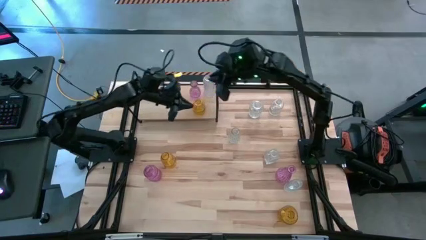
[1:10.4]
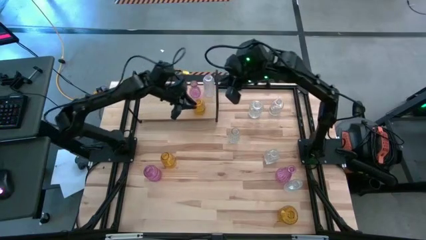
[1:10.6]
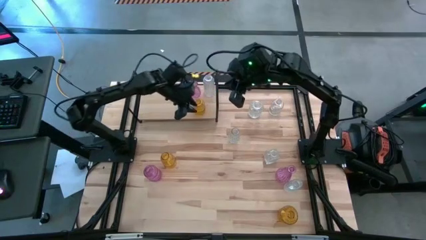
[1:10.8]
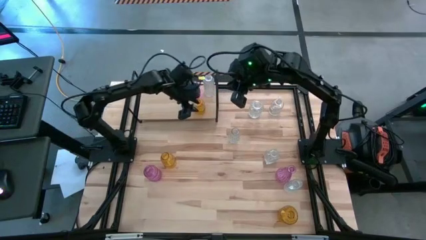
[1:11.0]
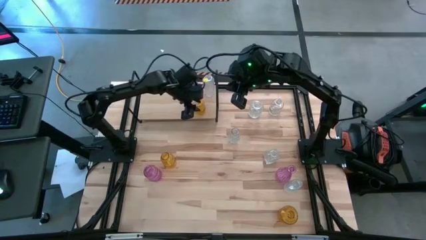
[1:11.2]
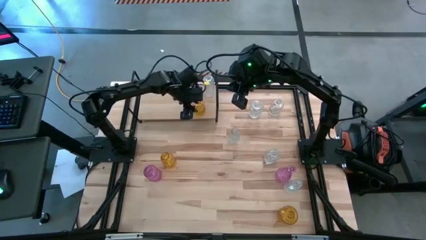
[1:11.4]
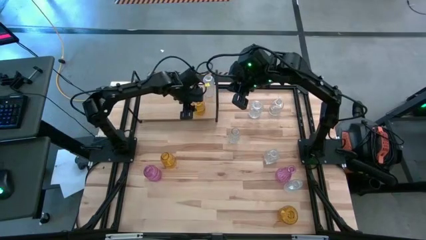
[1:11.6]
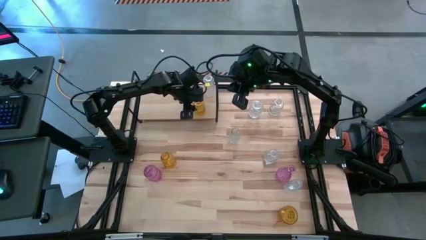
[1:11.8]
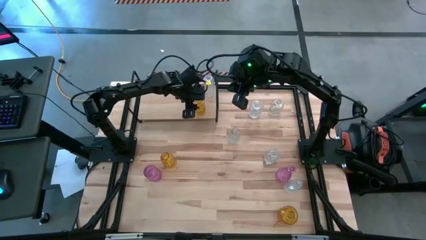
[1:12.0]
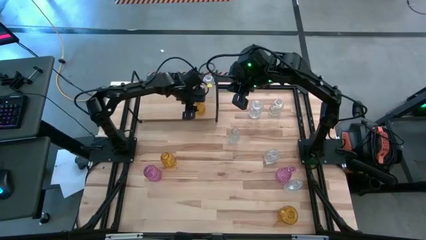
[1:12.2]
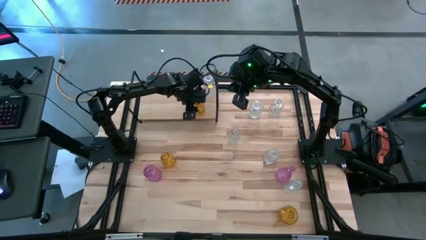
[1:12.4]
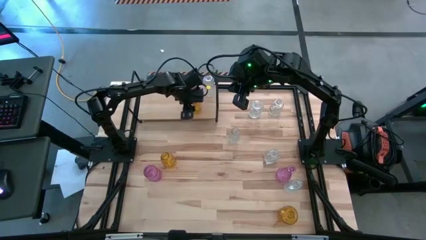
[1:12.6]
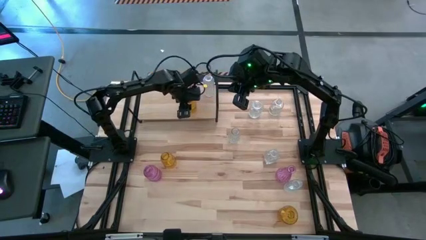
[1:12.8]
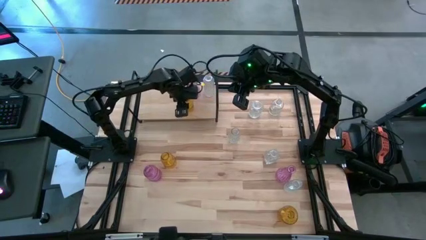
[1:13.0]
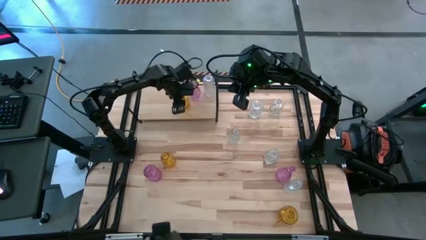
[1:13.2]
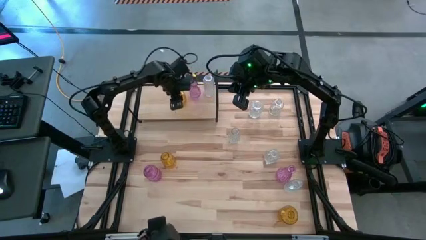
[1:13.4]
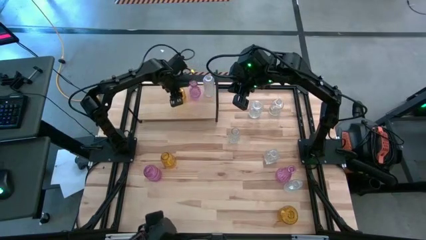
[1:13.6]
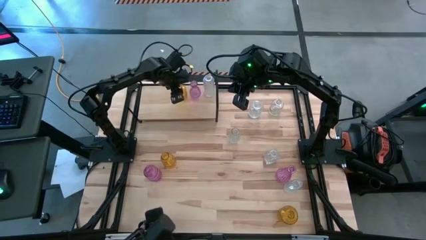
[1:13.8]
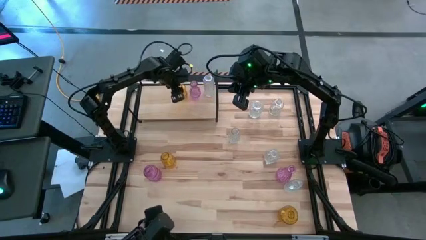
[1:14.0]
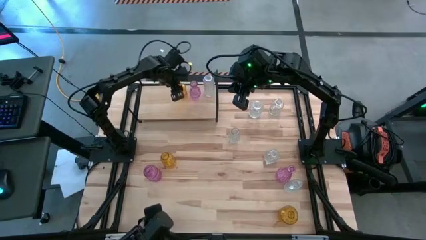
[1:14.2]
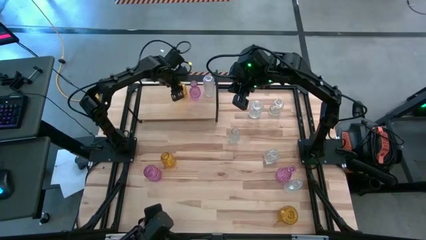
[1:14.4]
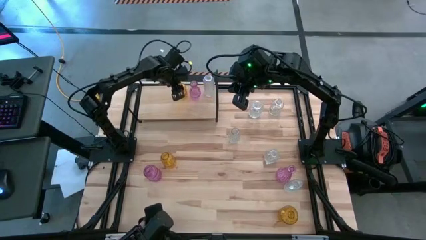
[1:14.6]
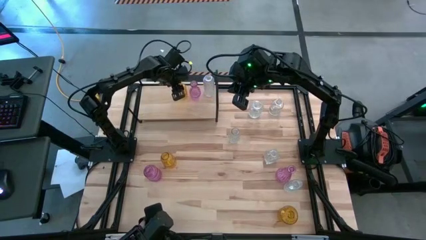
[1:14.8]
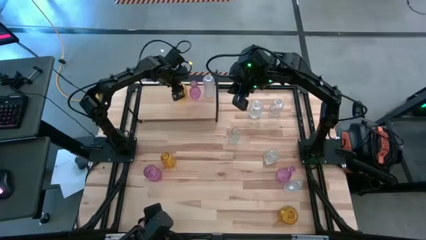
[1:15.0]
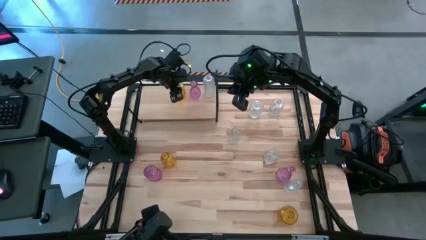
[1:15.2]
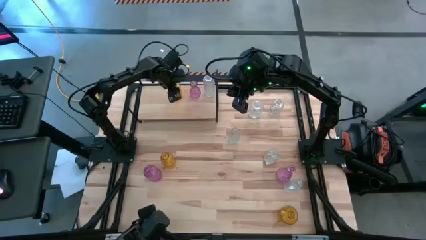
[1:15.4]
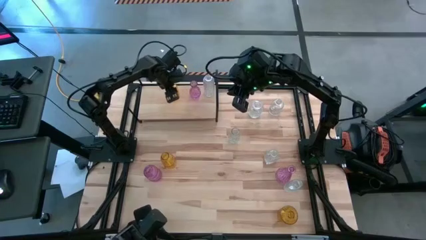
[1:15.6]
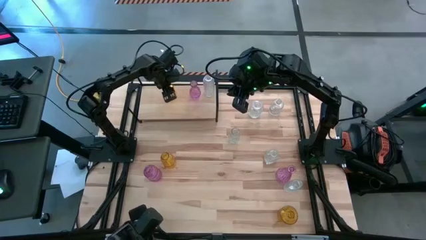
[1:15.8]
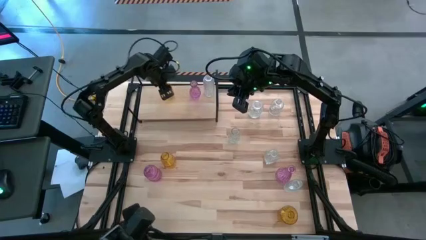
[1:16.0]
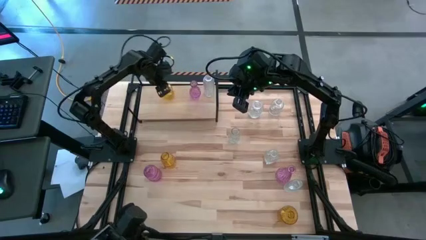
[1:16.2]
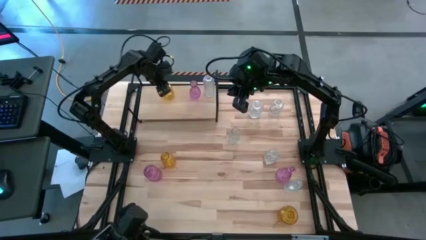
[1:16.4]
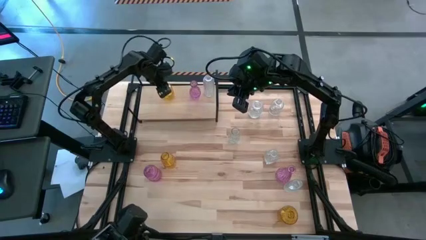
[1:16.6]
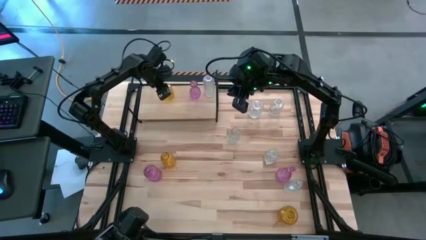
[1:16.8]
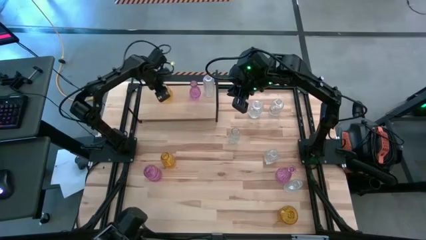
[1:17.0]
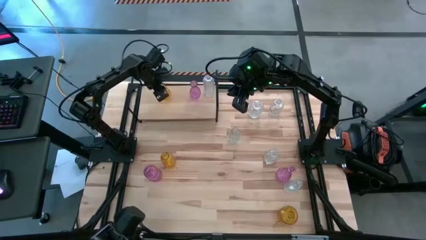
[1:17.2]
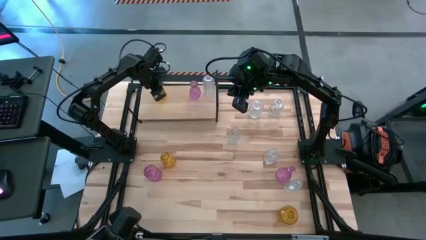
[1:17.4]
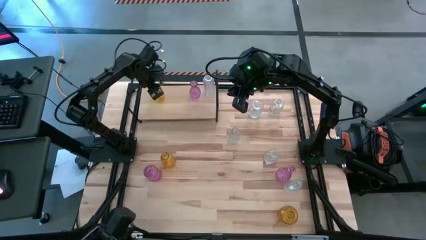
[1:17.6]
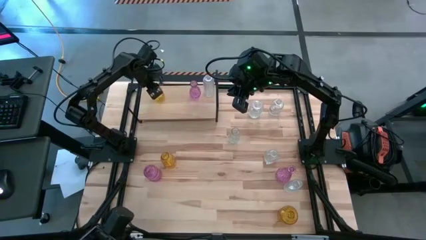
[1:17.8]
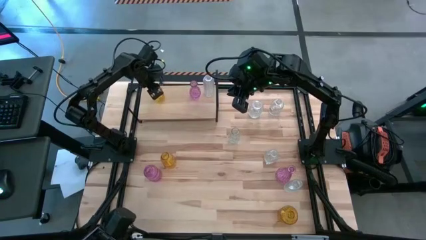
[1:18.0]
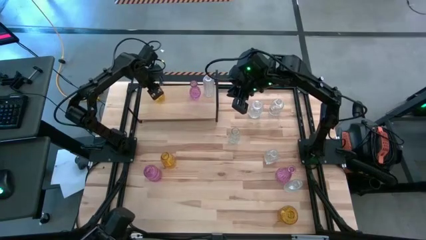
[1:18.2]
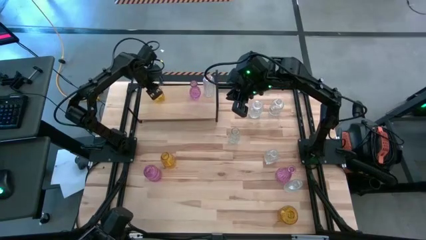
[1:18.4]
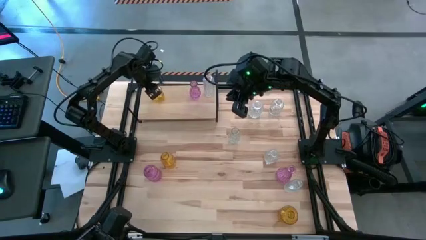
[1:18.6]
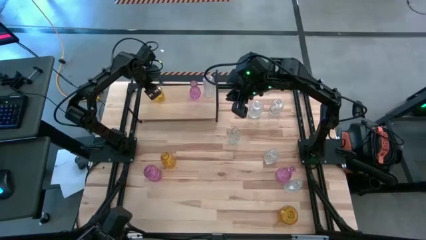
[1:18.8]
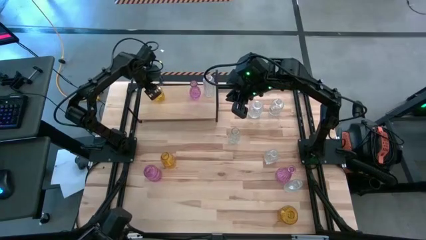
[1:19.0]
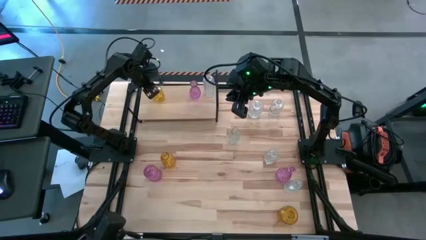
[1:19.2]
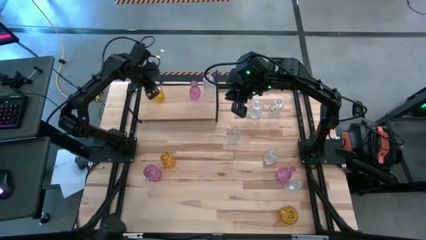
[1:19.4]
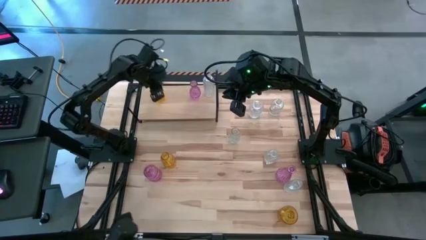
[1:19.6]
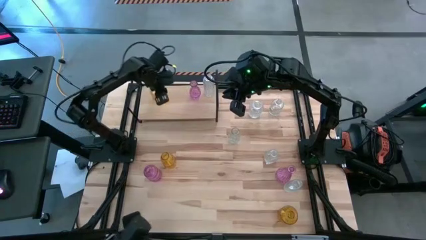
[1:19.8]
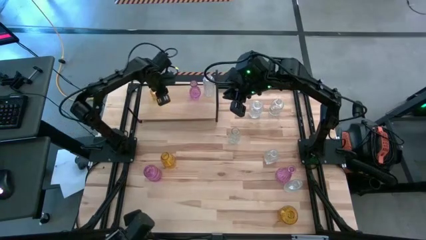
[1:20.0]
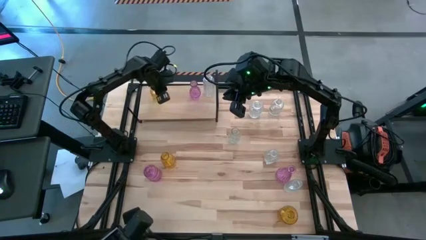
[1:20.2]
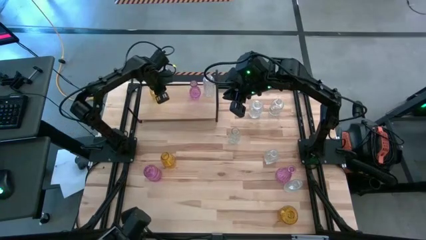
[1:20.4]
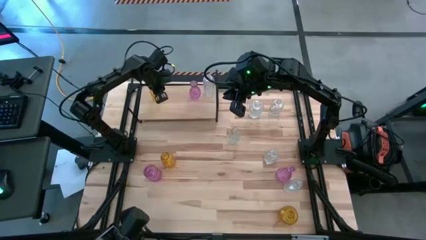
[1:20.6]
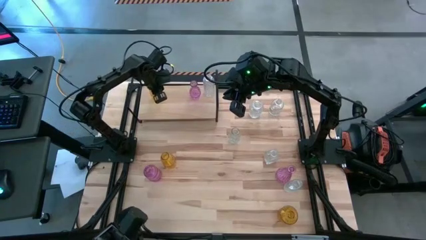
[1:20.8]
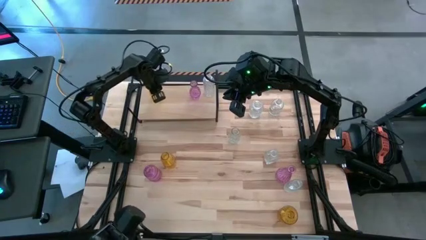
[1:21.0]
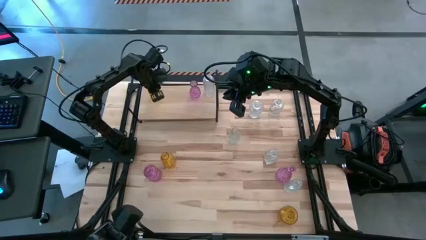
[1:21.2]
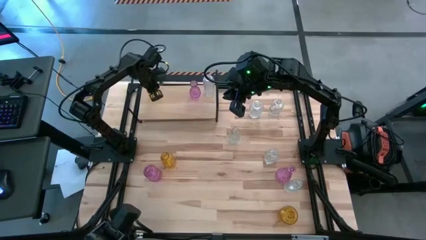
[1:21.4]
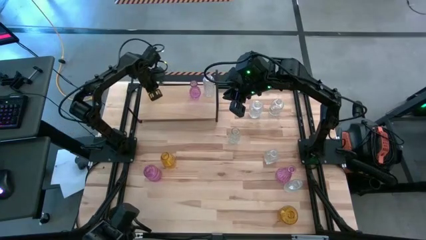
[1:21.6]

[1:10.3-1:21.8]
Task: sort vases onto shelf
Put the yellow vase in the top left corner of the shelf

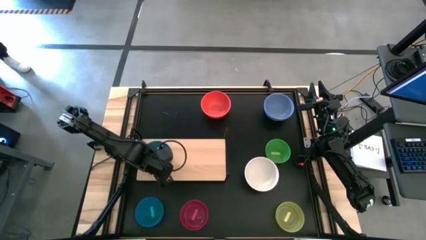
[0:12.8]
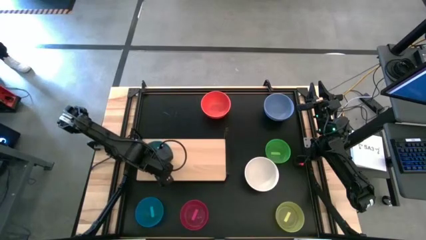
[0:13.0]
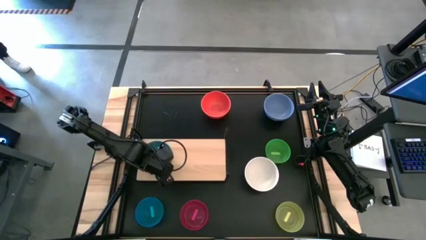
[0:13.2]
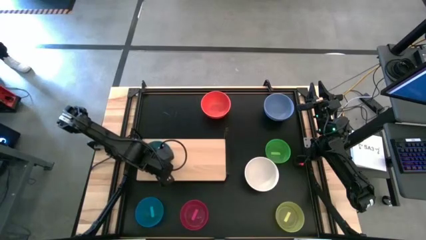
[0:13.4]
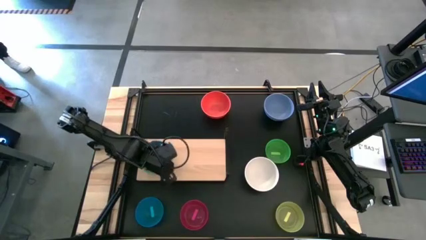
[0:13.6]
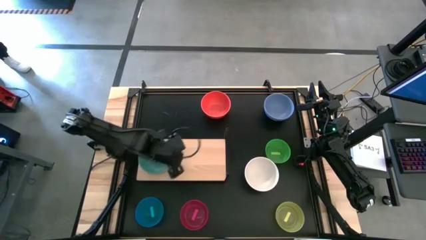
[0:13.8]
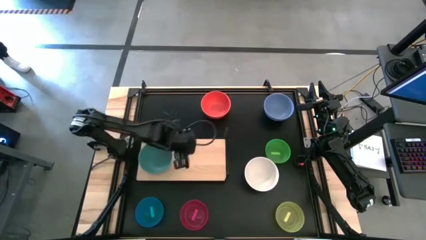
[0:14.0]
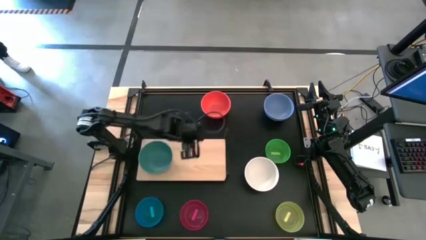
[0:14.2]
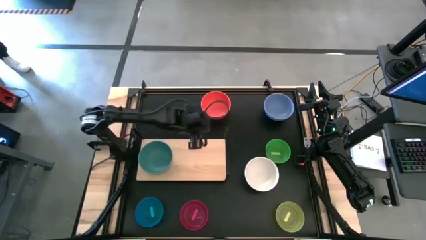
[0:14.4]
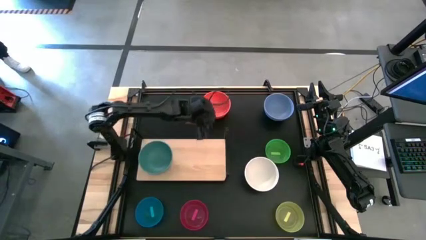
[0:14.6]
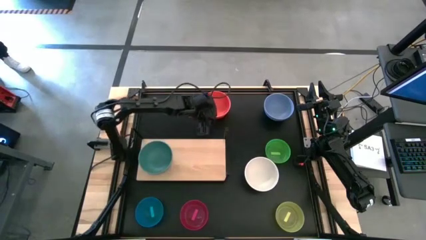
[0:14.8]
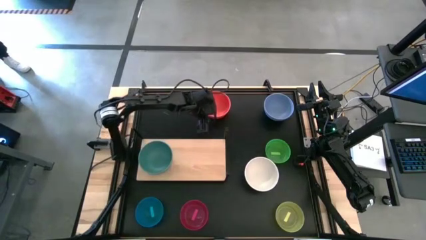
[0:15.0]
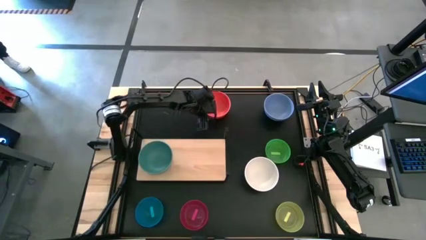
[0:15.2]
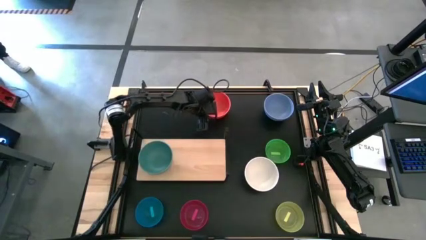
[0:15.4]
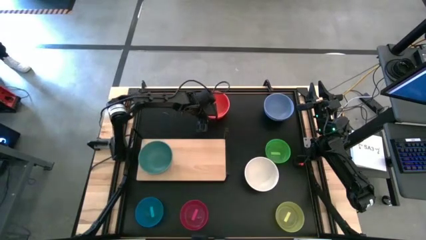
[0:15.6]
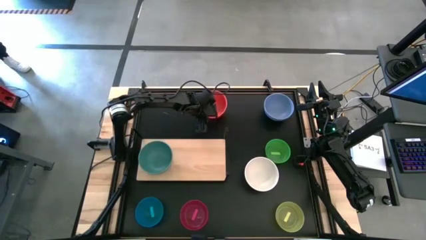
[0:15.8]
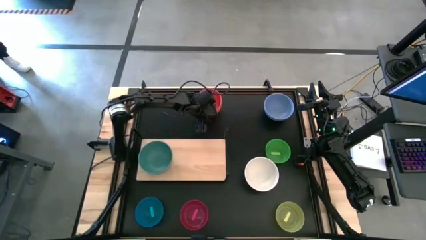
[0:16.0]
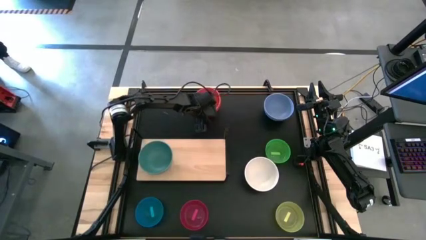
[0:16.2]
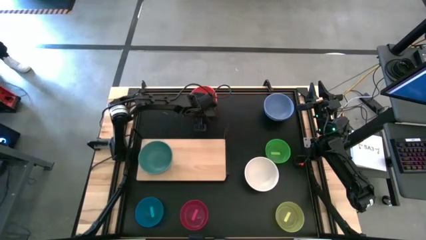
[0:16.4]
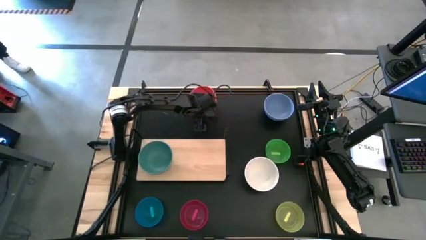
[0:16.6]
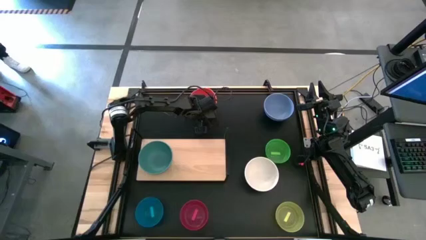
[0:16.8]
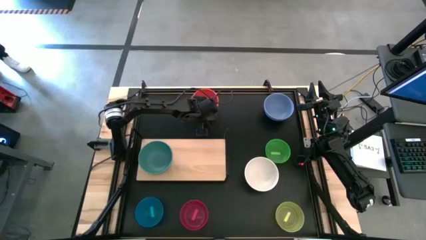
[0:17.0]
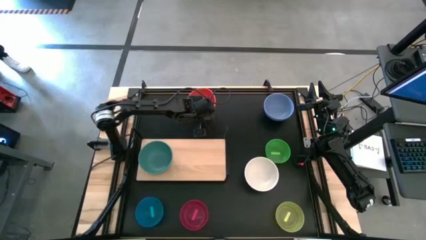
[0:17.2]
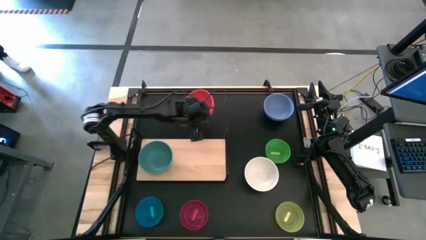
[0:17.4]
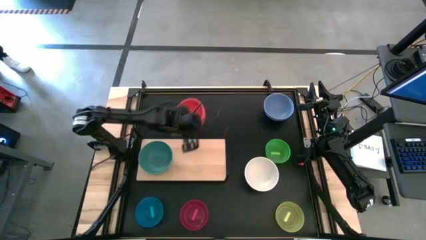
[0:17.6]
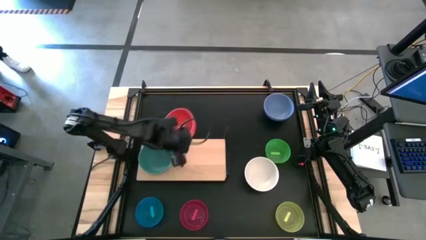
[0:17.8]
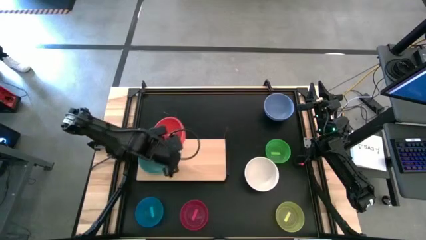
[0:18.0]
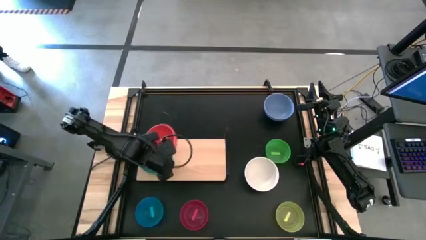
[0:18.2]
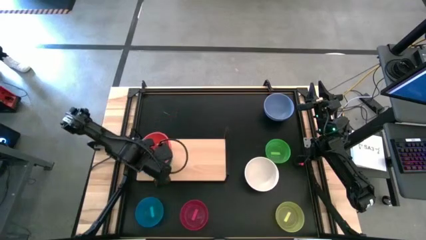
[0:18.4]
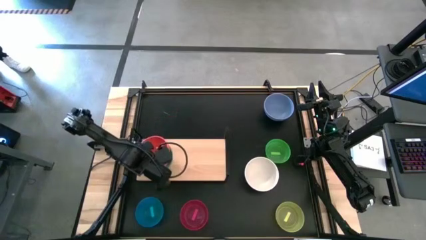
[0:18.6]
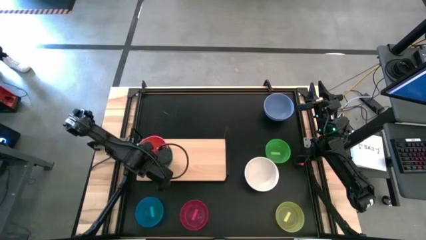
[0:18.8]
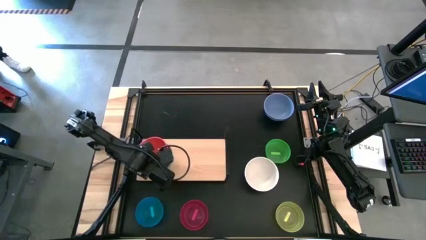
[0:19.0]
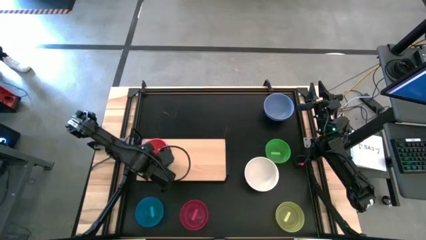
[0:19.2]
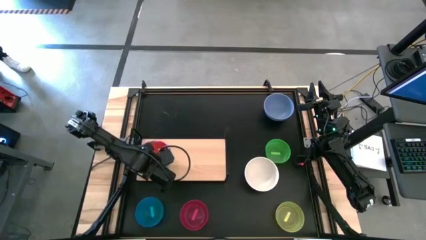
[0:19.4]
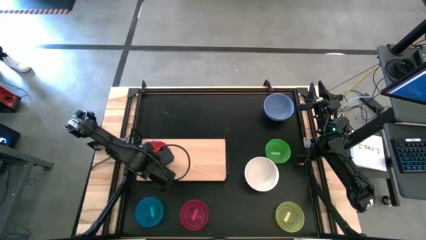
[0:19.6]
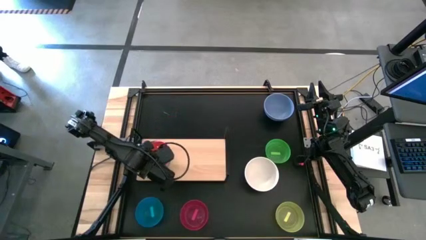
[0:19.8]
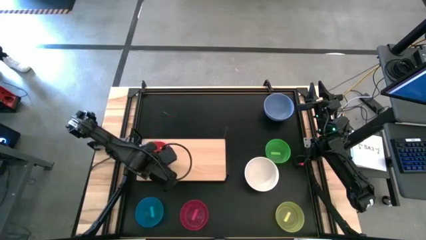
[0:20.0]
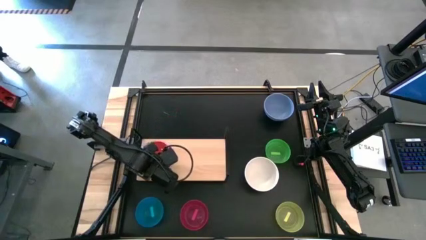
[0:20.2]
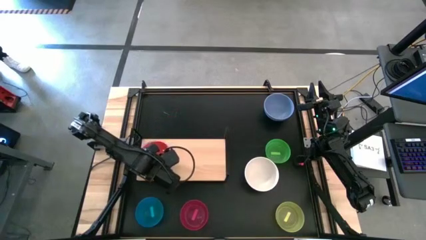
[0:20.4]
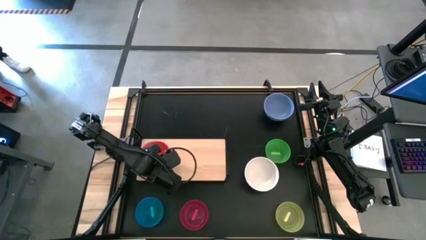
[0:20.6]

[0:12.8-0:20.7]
Task: Place and stack bowls onto a shelf
Stack the orange bowl on top of the green bowl on the shelf
